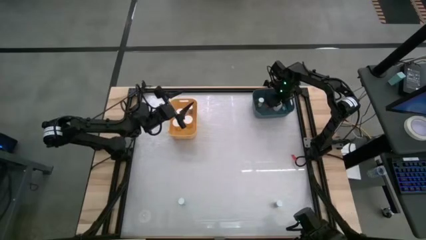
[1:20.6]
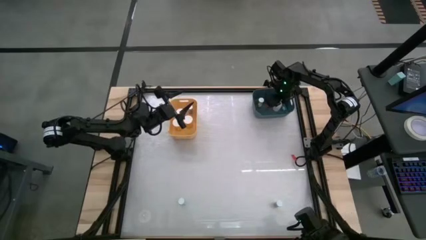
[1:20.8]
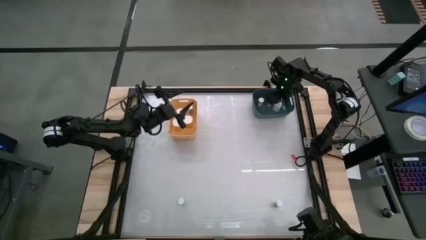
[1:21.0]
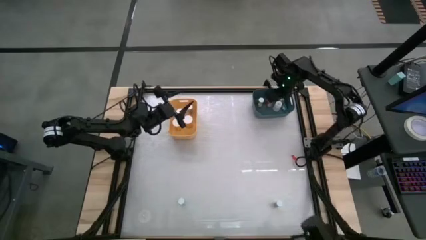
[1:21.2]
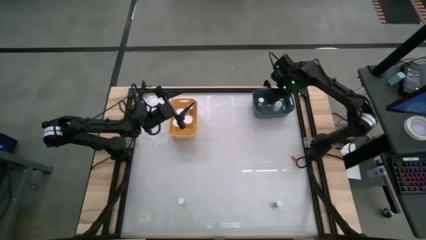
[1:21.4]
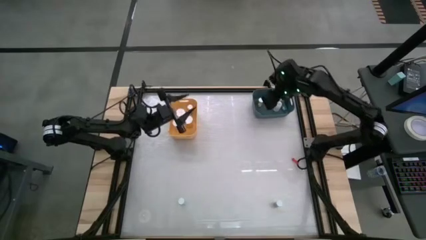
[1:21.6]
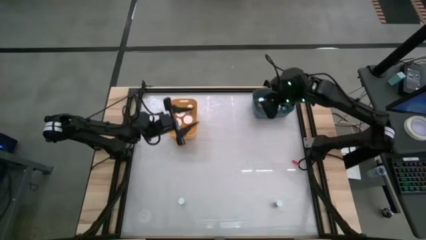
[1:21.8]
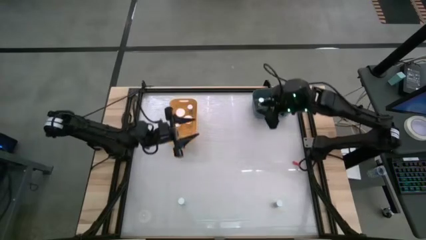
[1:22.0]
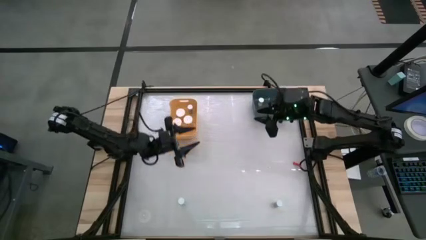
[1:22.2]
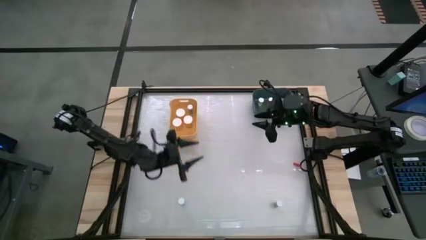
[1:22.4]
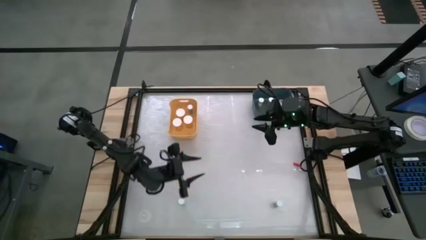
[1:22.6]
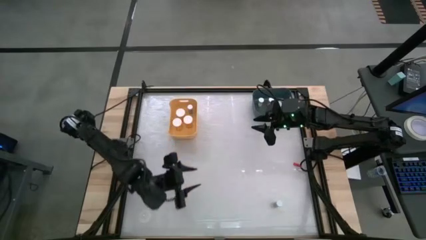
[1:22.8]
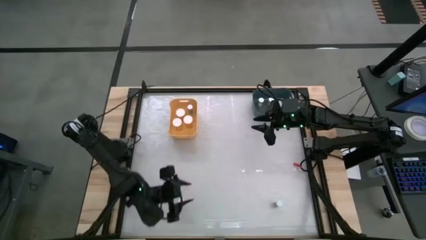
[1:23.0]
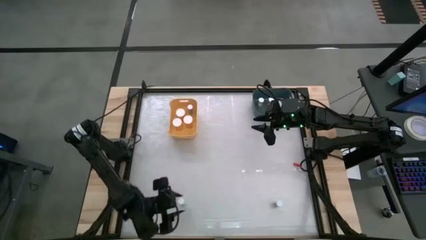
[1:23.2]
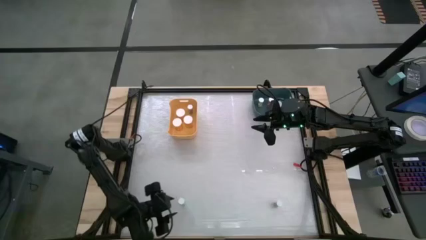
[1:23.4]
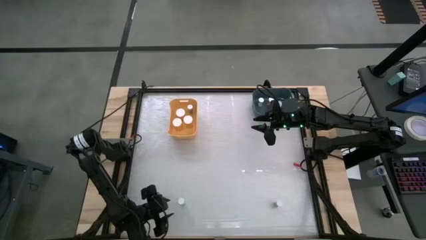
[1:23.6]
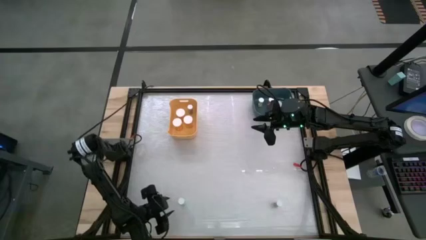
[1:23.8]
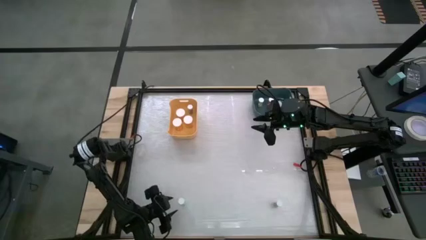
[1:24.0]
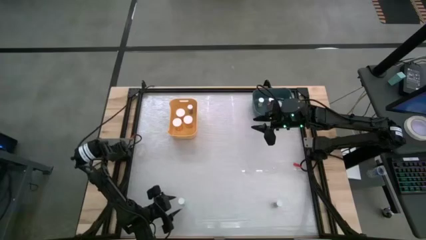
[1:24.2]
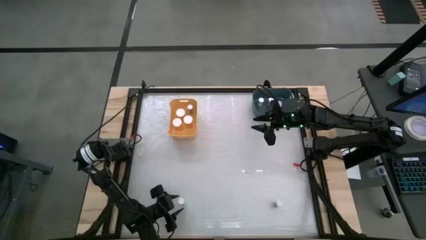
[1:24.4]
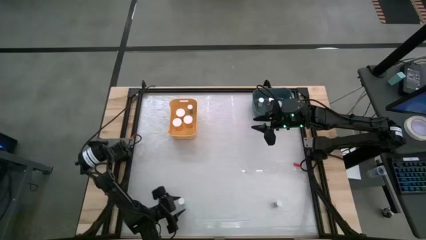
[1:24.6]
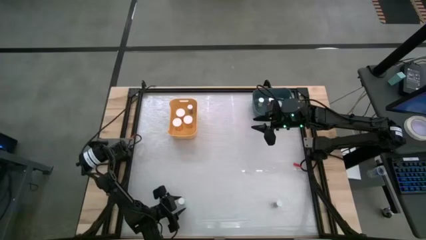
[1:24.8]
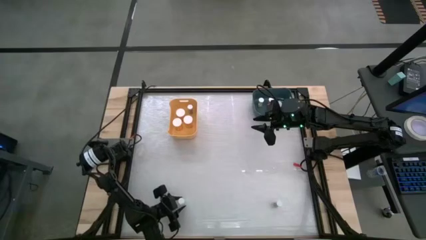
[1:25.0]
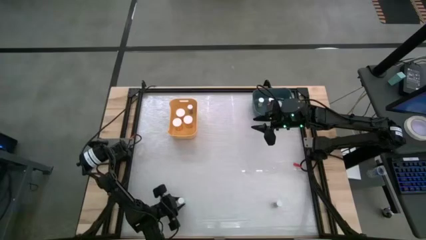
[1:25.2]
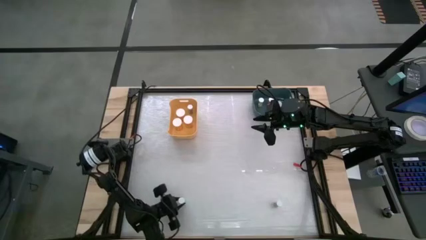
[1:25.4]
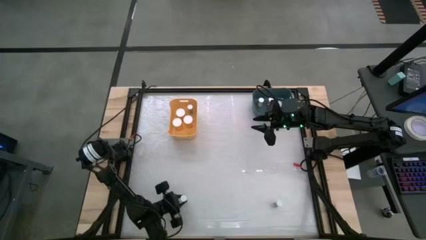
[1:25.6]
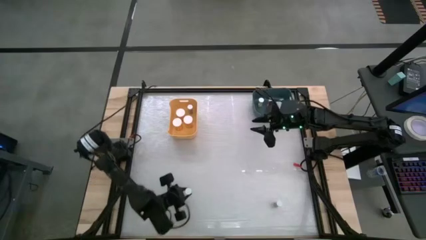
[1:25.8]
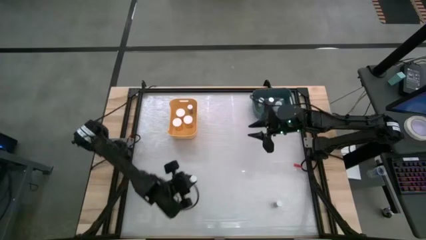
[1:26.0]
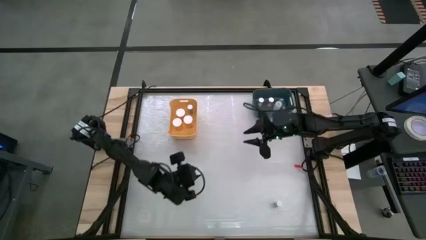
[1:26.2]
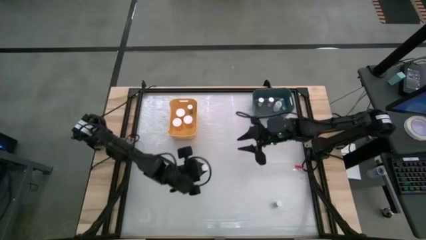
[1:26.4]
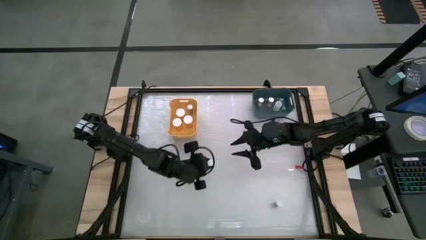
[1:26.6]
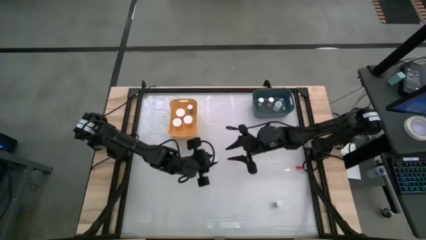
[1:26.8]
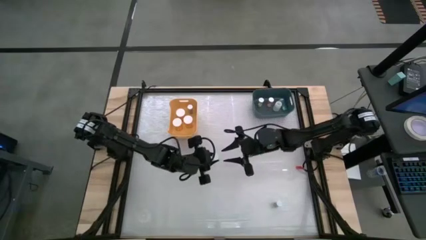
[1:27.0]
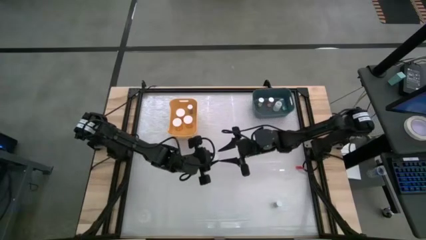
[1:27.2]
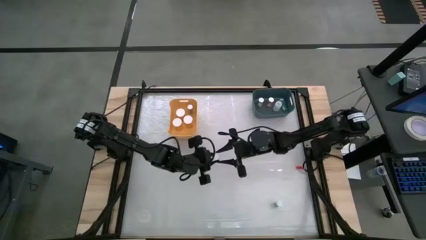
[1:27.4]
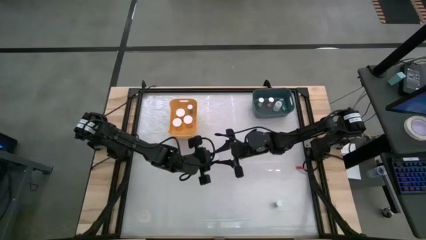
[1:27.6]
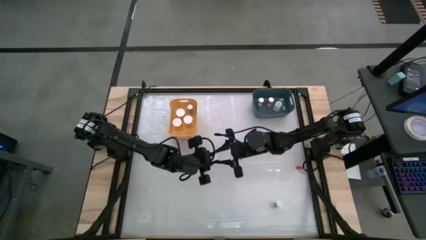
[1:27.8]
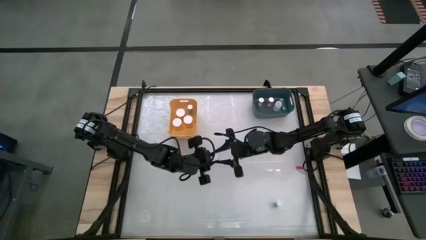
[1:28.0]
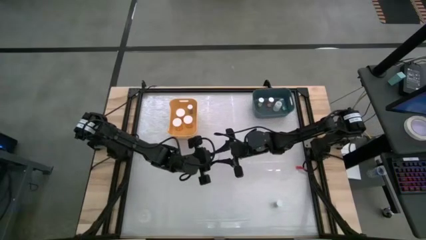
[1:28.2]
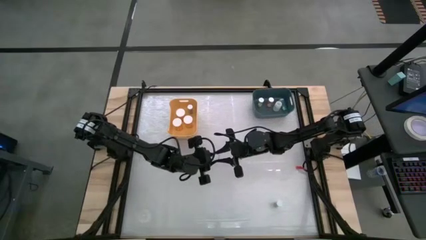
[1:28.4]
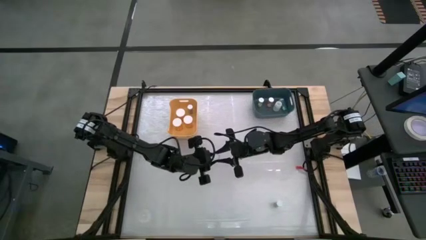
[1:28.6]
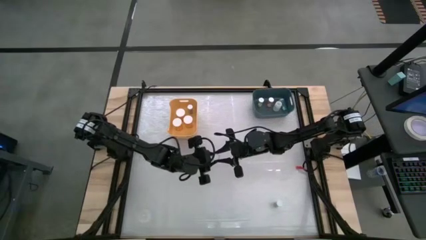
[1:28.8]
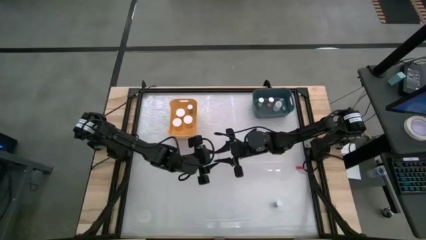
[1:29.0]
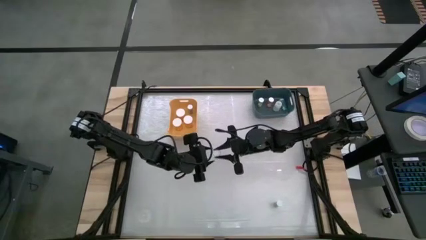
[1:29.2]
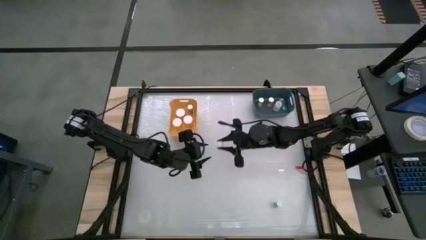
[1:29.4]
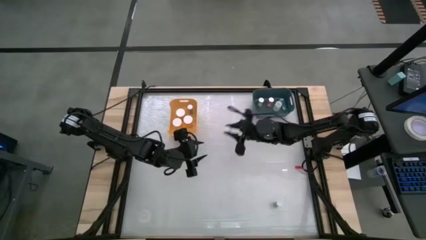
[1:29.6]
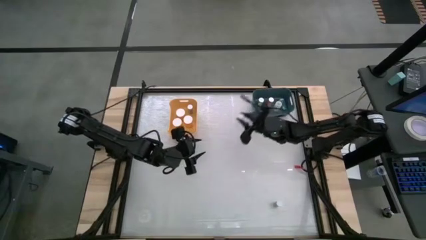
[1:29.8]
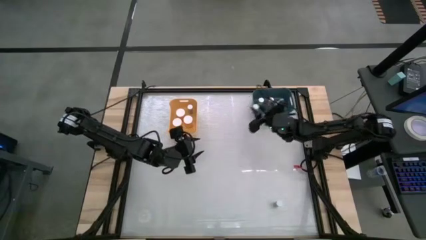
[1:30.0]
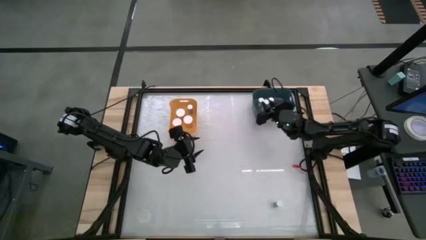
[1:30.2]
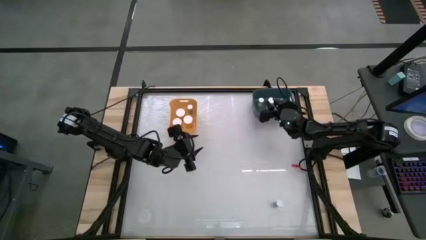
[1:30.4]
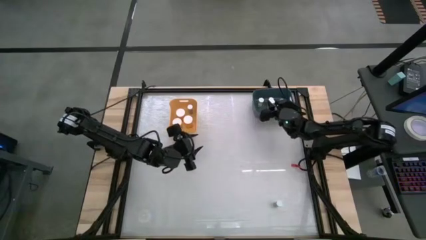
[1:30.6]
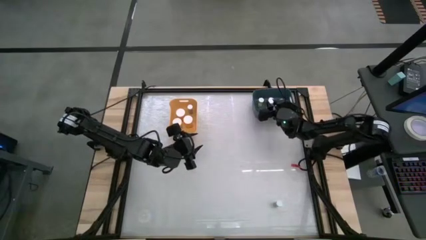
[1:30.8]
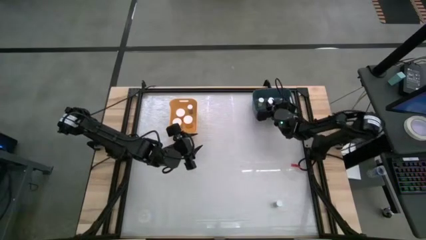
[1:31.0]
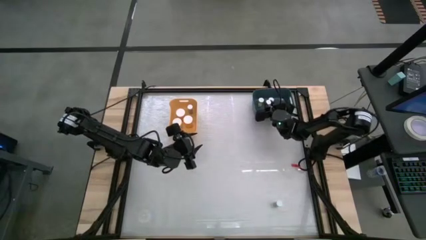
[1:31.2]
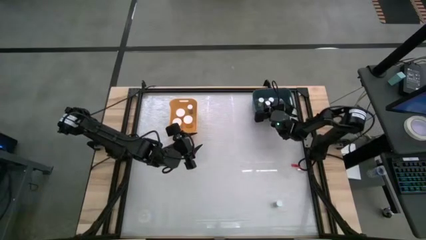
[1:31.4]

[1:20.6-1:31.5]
Task: Pick and place medicine bottles into bin by pill shape (circle, oval)
Put the white bottle pill into the blue bin
